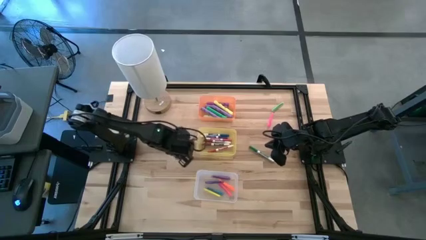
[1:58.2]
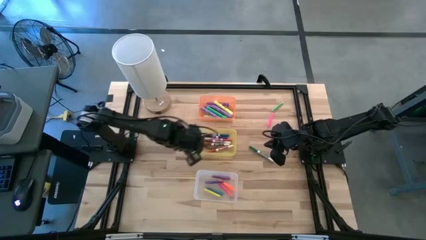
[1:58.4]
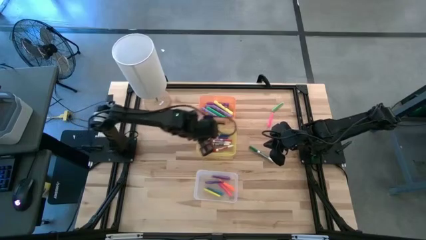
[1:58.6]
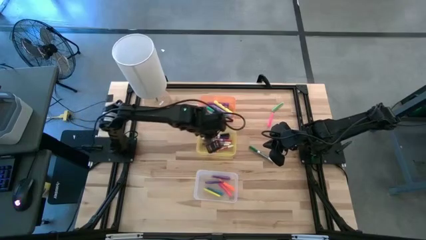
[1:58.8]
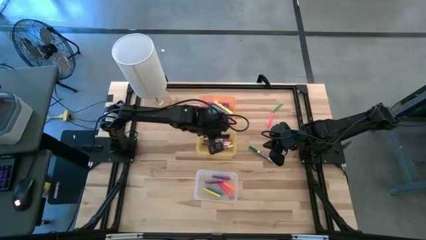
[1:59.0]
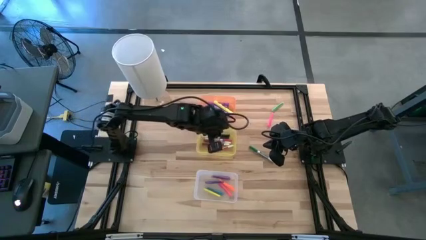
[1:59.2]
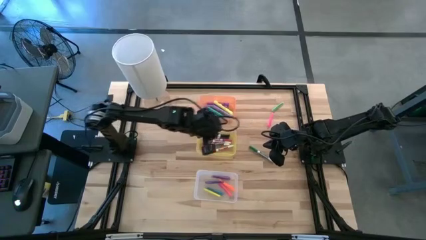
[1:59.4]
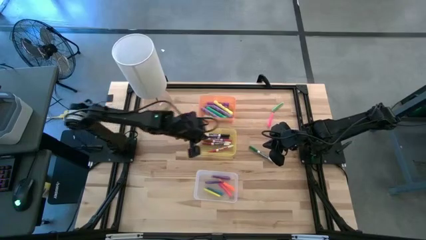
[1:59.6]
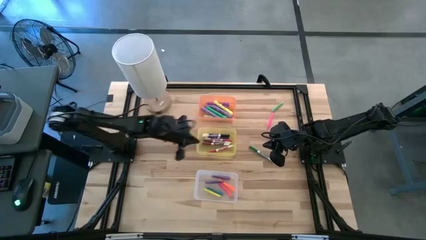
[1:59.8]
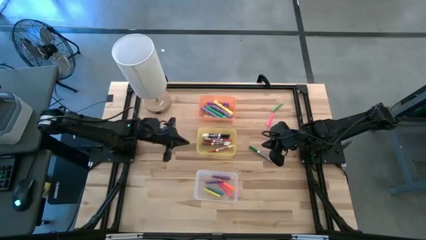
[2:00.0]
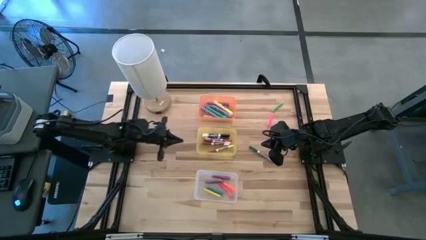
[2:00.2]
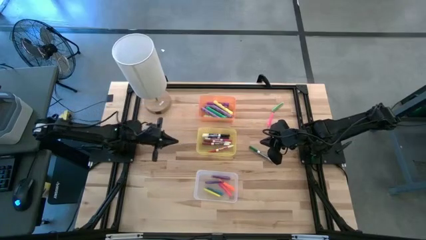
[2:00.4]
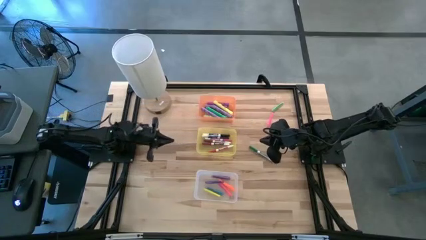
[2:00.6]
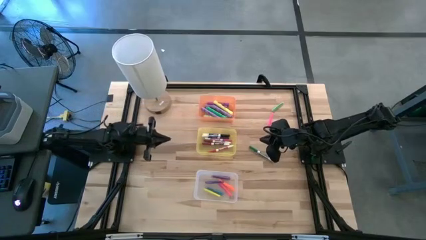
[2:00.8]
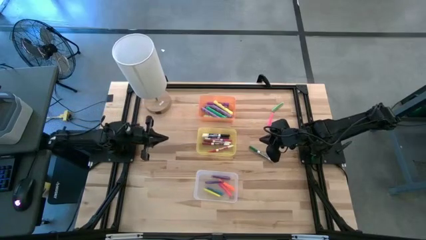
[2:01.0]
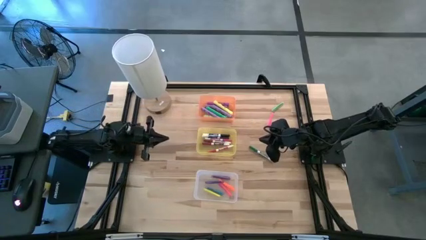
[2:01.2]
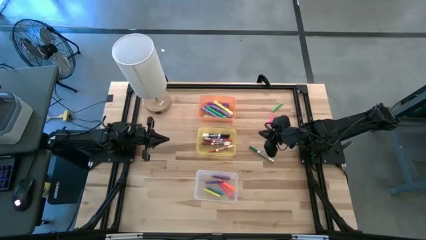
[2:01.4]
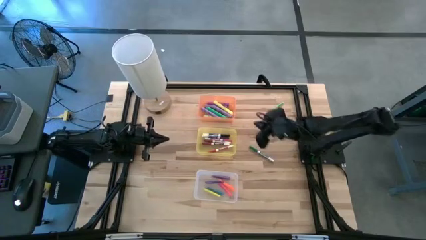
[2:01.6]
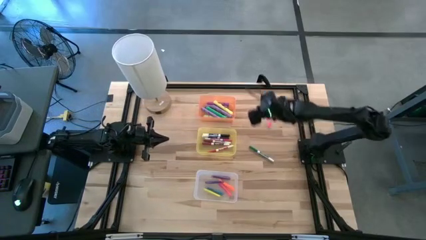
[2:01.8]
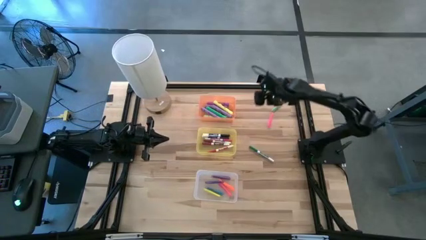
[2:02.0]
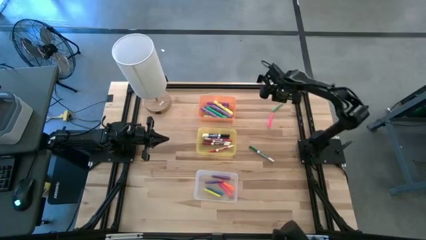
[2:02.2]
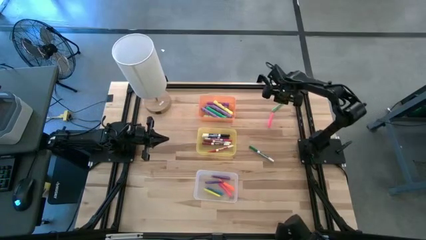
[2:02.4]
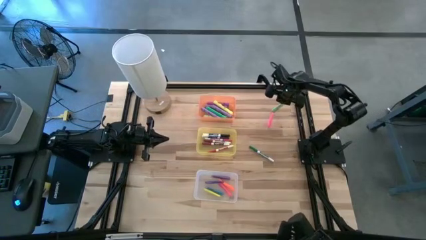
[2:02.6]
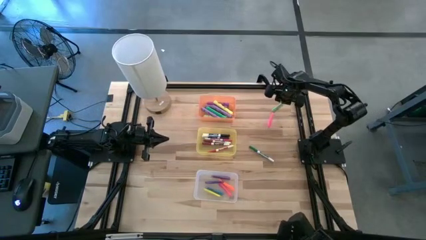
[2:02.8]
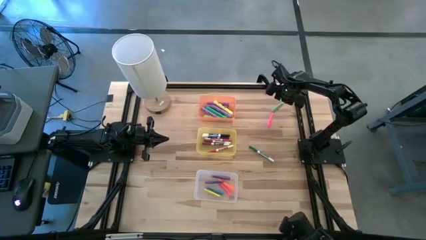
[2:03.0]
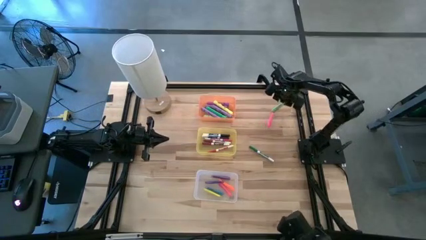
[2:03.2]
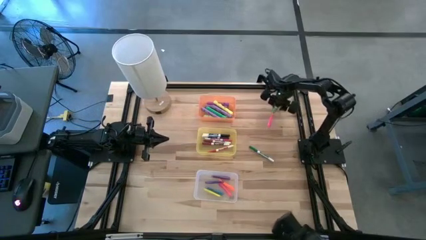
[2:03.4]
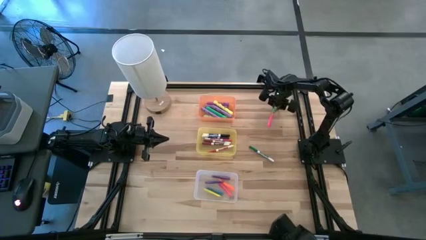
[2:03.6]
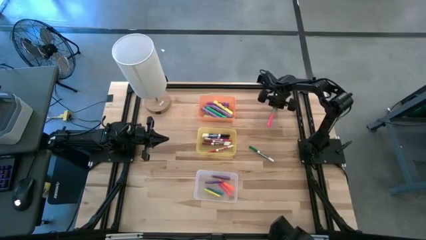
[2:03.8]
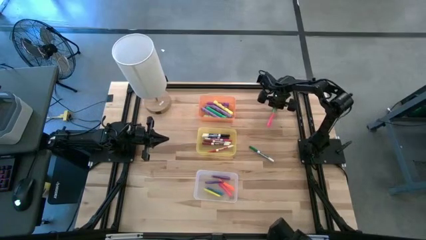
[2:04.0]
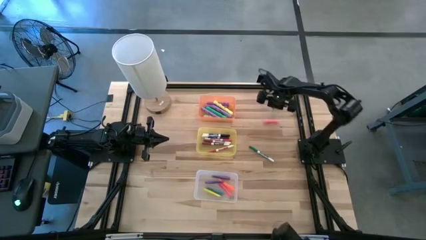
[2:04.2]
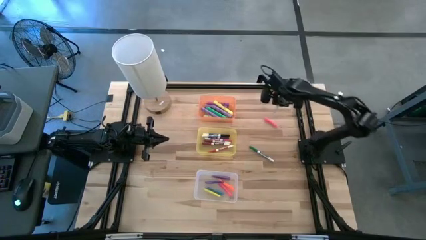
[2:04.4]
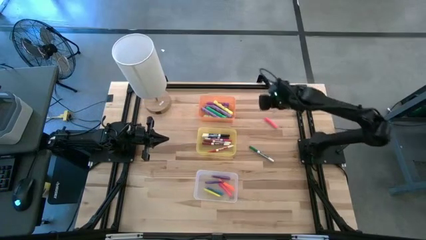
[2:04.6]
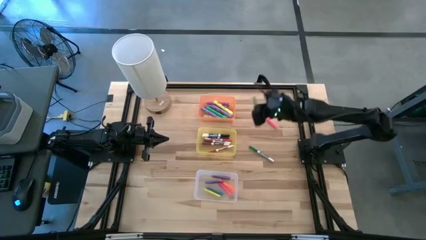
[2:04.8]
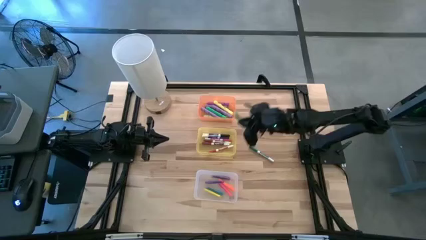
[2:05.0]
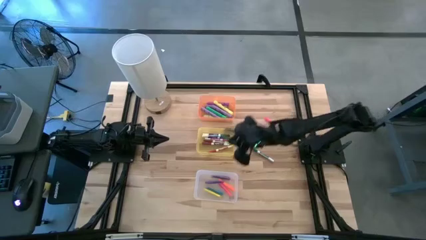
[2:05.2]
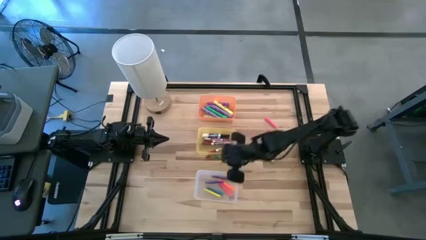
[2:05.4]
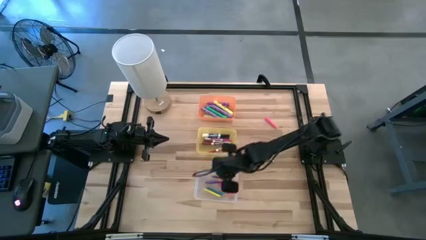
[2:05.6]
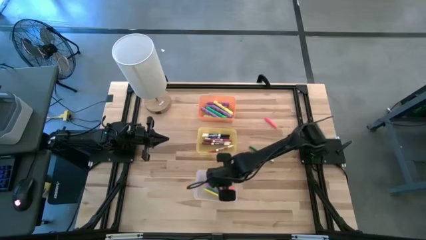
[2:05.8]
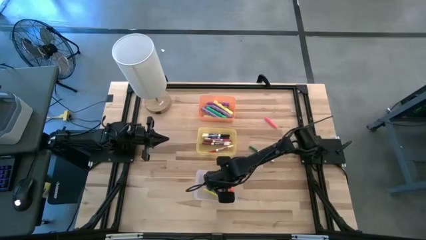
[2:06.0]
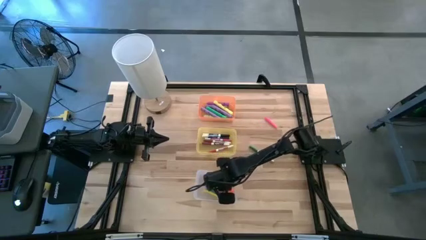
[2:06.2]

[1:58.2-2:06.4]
Task: Pick & Place Markers
Put the green pen into the white bin

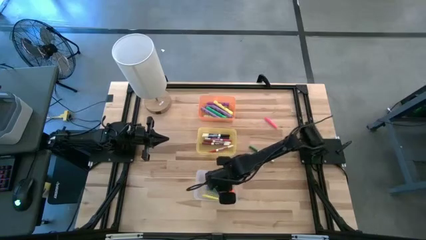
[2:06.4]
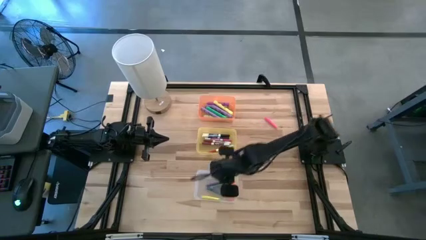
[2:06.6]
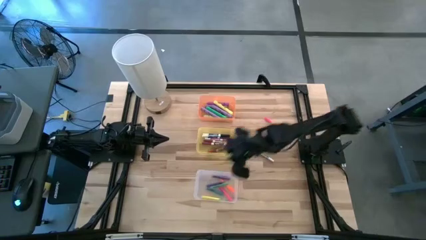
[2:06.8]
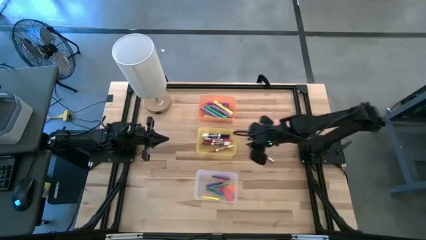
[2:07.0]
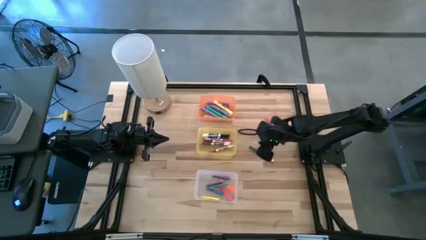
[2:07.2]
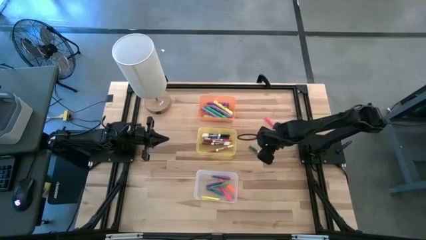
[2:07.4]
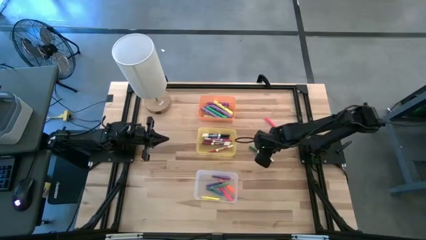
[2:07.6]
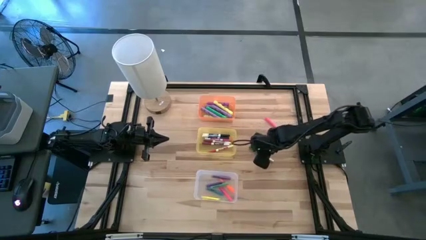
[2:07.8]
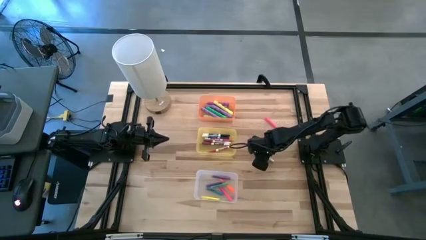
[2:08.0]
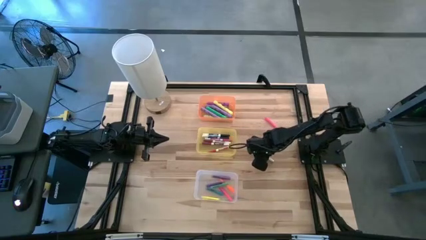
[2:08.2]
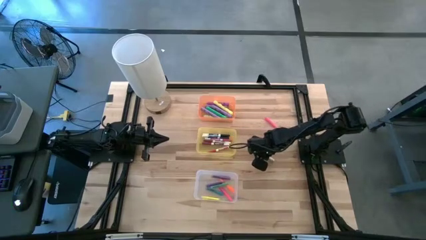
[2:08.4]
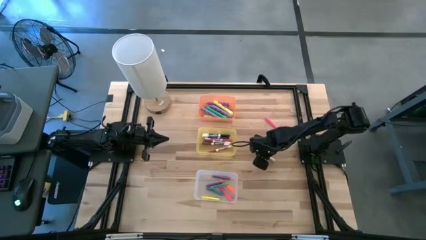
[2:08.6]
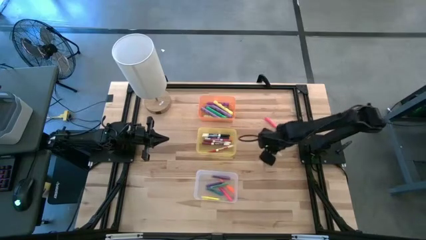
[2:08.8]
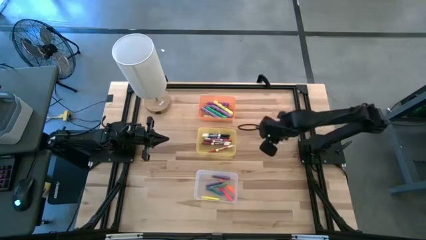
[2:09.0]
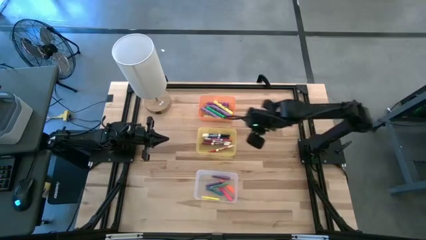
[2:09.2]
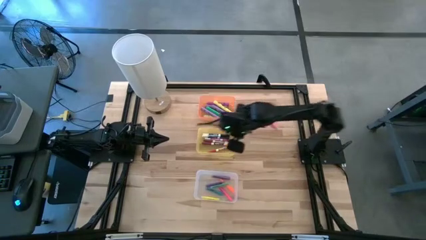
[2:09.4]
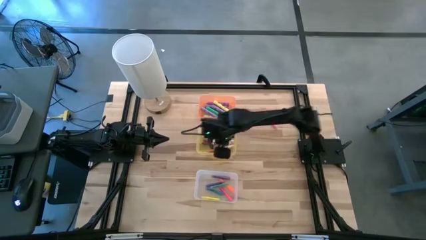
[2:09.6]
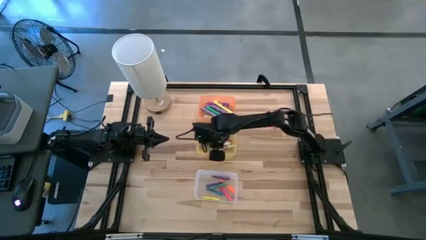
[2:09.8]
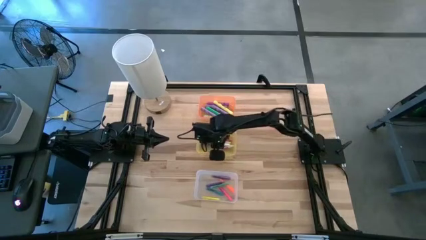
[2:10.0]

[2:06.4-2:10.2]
Put the green marker pen into the yellow bin

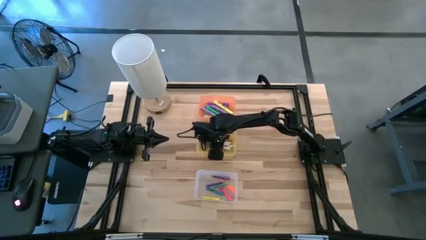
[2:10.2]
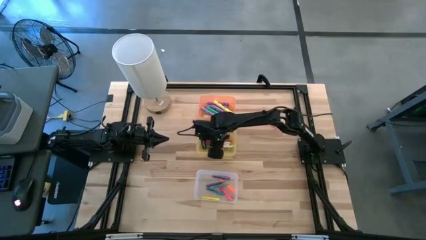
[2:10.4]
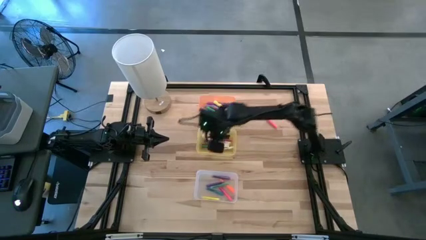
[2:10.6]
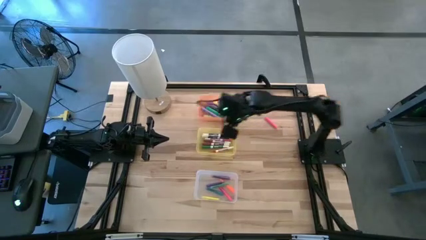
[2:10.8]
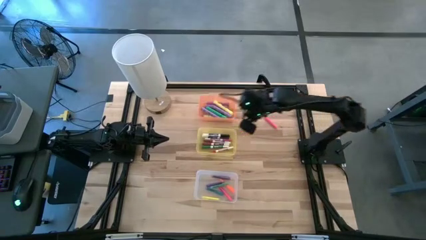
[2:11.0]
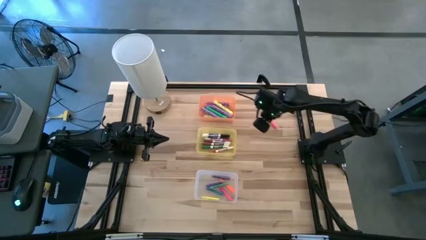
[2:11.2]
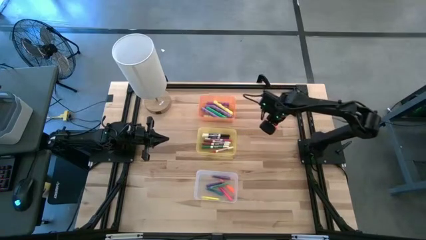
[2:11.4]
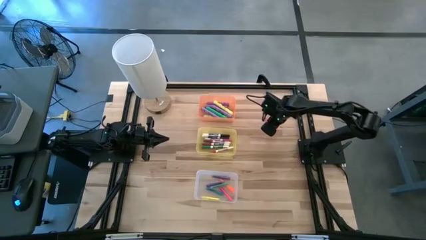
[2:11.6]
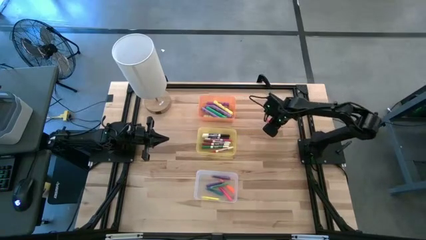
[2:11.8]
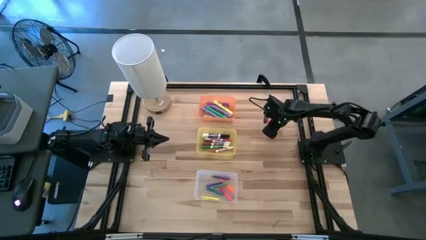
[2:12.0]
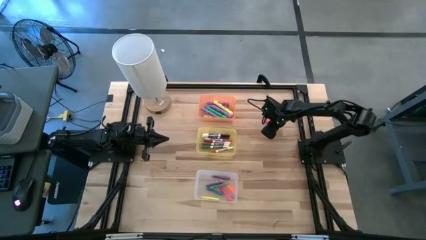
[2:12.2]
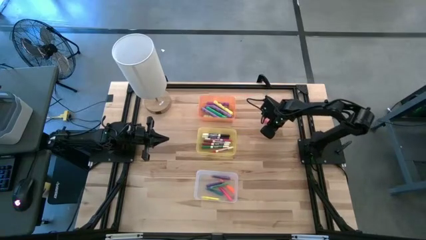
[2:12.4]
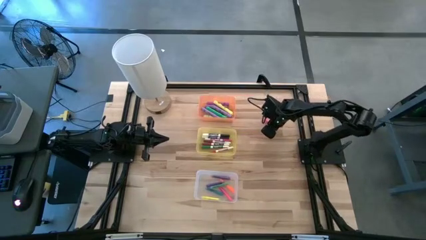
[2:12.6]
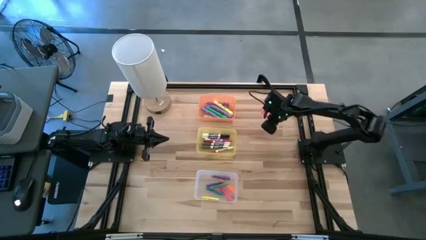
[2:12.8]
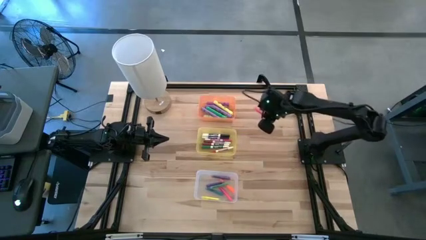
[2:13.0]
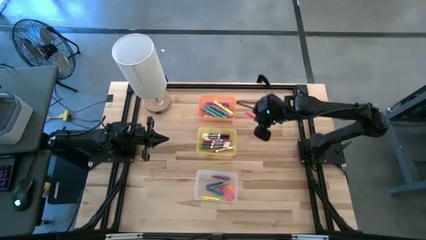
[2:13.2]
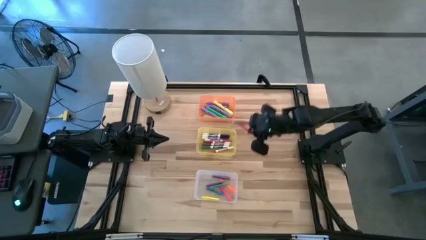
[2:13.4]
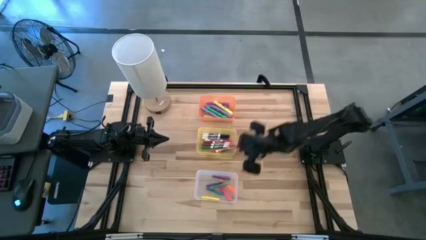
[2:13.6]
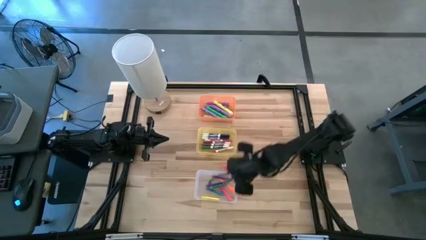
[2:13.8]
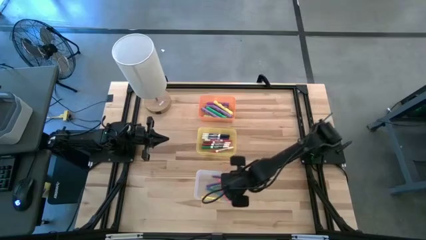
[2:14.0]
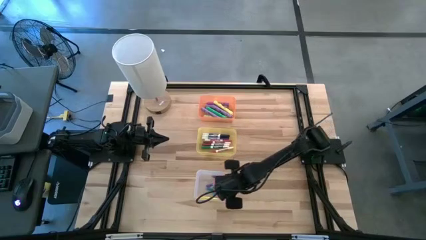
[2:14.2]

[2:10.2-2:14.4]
Put the pink pen into the white bin
